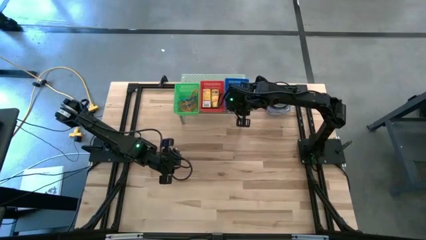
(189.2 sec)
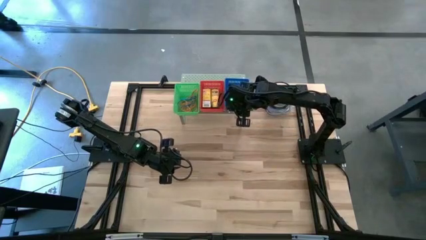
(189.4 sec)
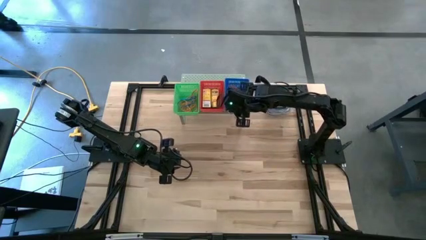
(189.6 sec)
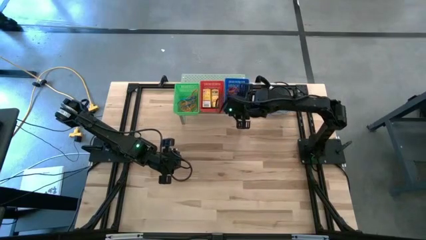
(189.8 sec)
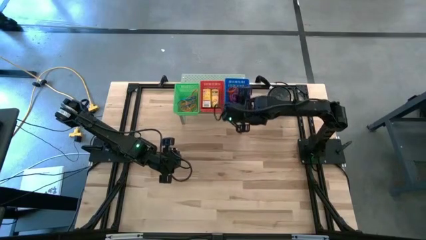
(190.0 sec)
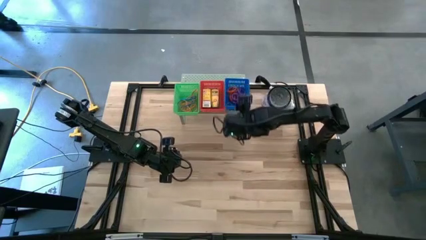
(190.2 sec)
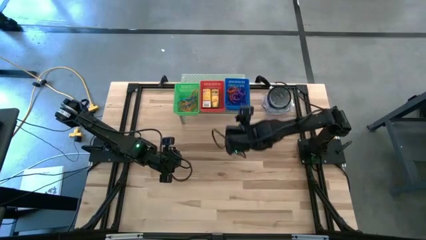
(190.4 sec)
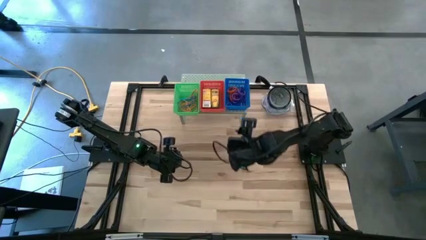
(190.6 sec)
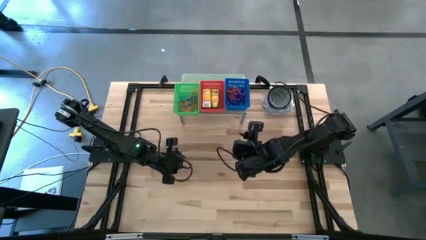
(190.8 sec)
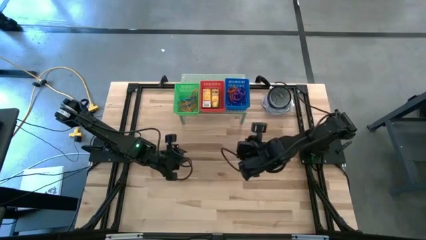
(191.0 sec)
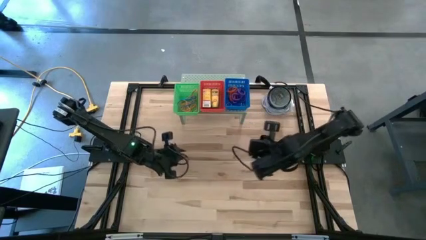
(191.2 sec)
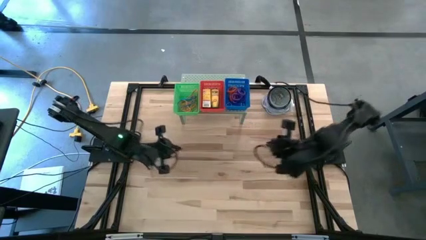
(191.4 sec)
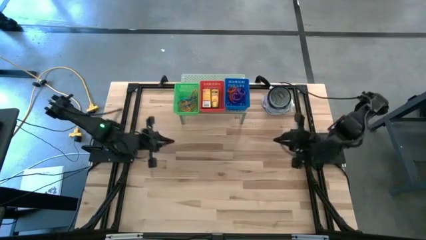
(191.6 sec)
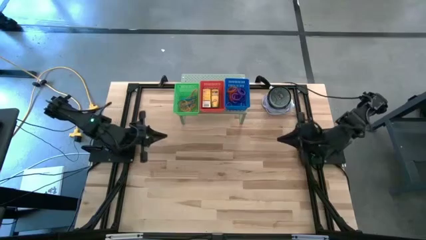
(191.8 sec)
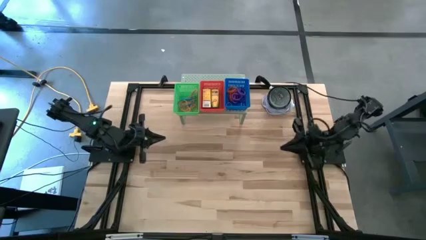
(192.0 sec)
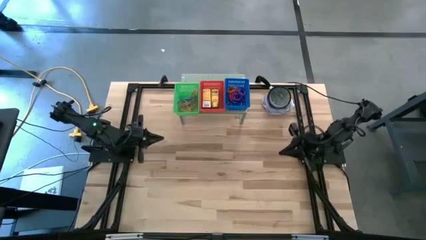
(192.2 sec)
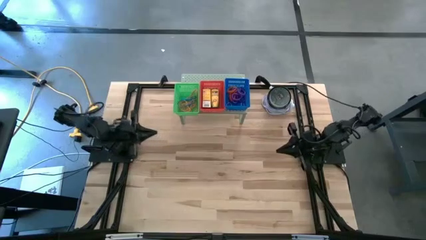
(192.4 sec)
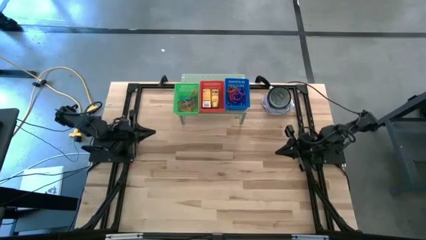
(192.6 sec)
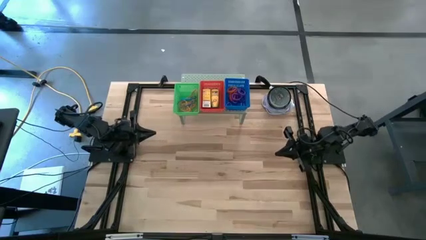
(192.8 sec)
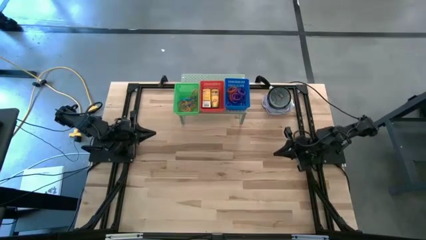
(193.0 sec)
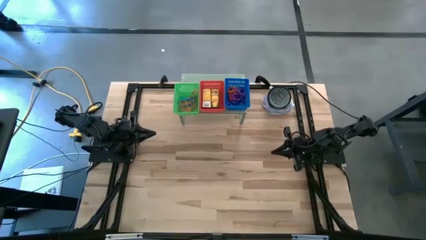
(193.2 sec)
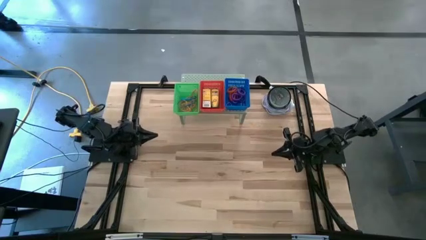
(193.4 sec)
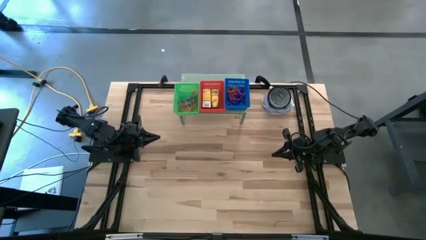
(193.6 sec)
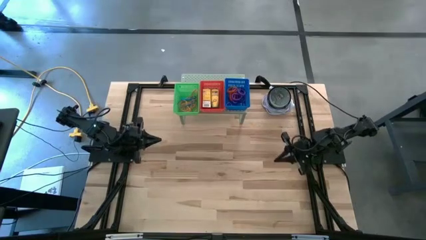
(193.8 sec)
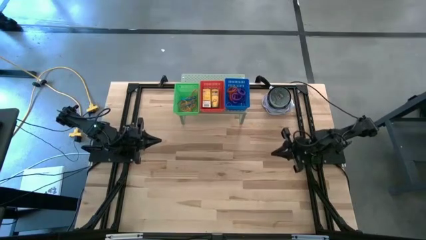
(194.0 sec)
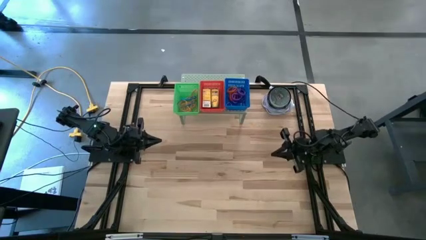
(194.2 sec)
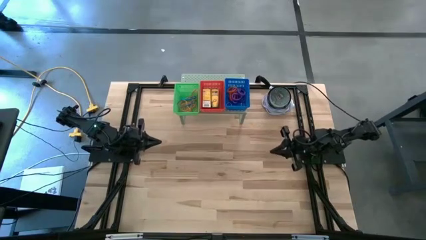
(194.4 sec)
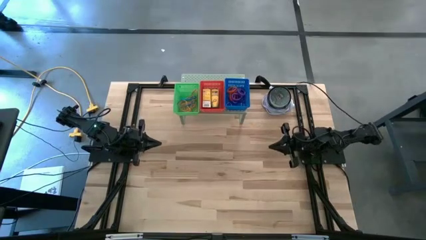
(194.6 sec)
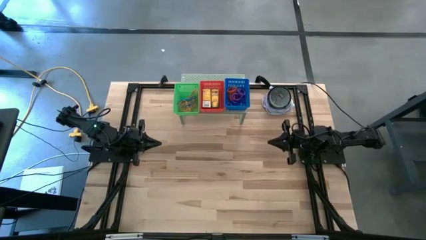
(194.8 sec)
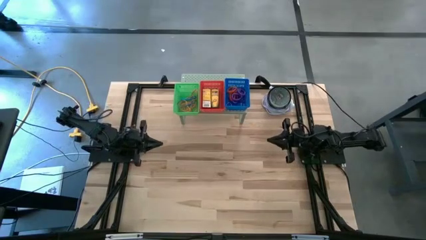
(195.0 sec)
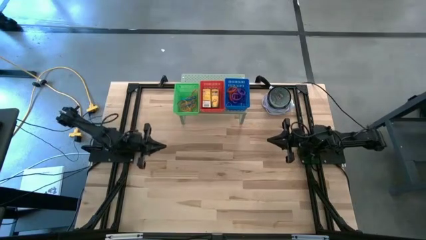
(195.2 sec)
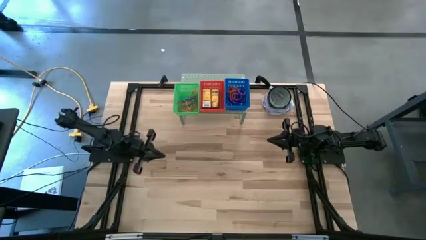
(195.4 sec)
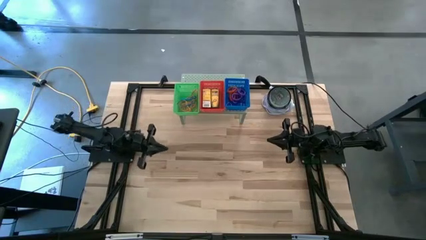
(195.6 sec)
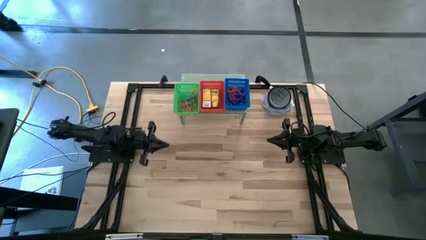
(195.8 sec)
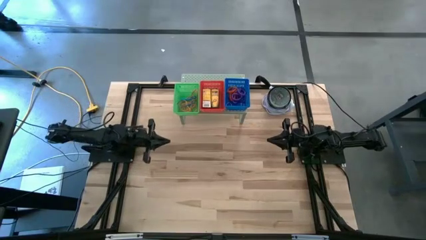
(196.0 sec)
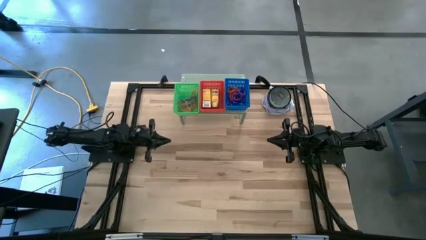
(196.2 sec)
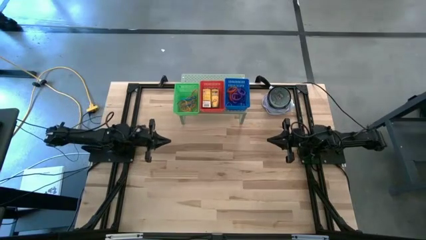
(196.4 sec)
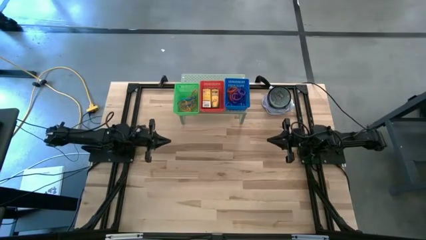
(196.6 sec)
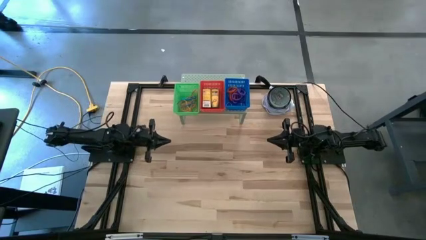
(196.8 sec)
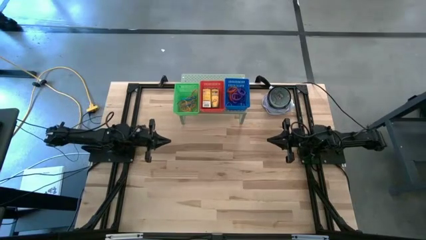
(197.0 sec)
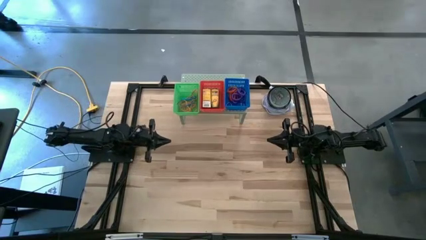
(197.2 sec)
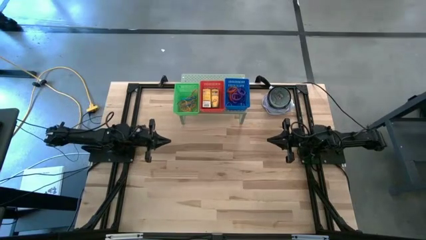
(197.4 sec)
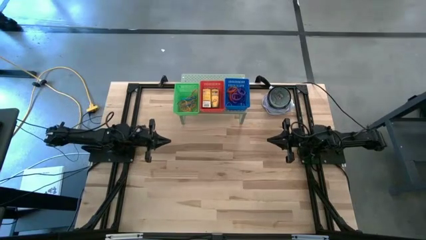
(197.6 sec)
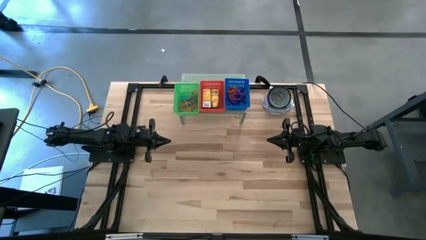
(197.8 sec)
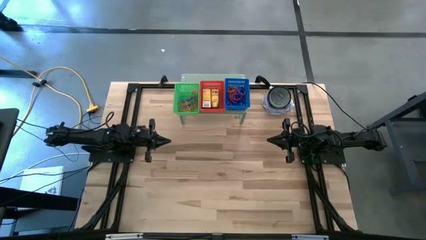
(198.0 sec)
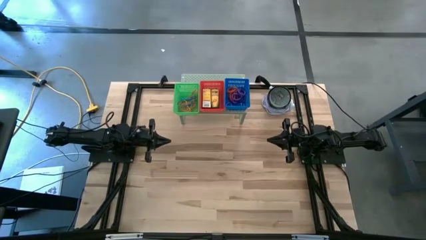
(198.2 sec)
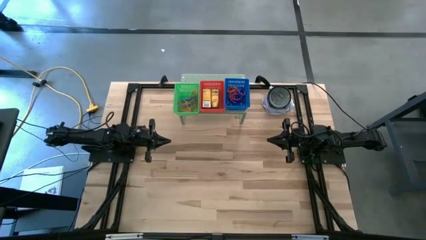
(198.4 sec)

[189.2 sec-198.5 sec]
Task: Pick & Place Office Desk Supplies
Return to Home Position

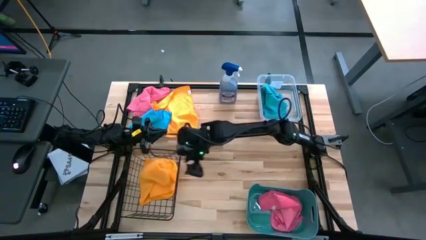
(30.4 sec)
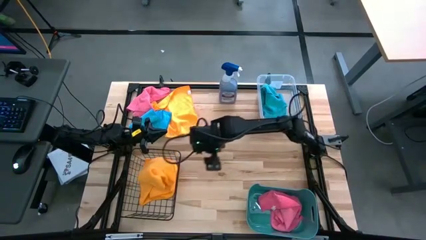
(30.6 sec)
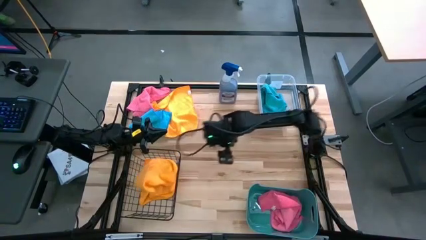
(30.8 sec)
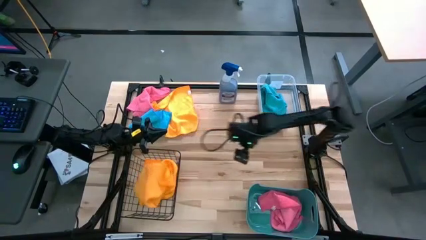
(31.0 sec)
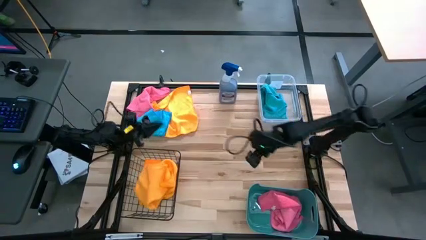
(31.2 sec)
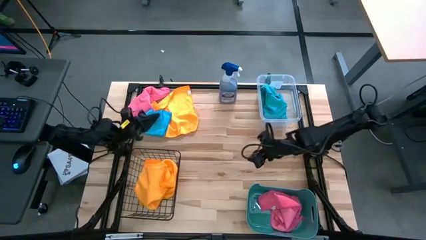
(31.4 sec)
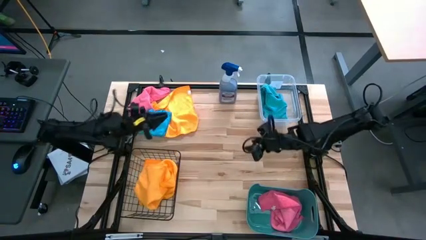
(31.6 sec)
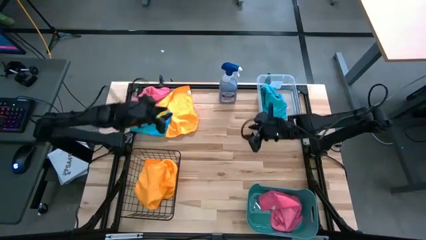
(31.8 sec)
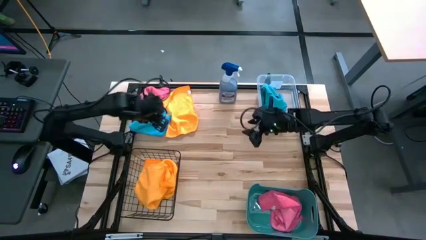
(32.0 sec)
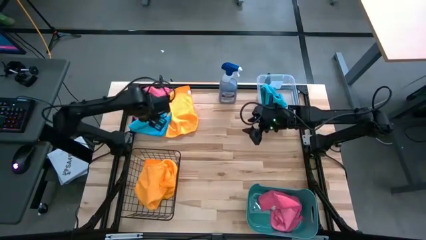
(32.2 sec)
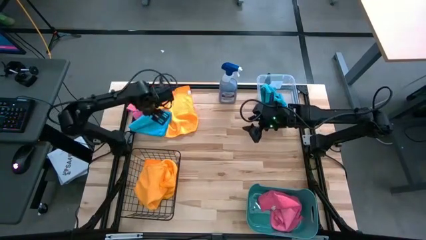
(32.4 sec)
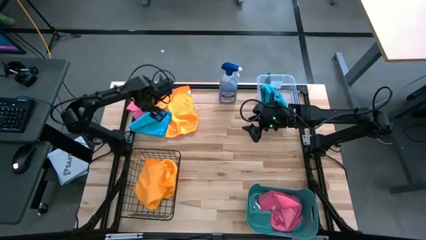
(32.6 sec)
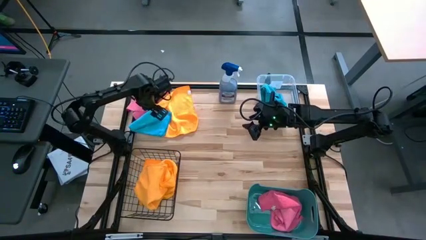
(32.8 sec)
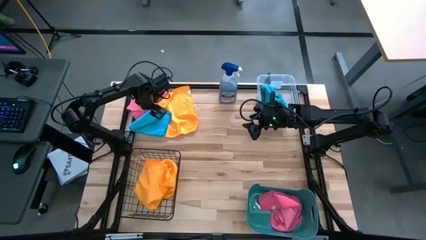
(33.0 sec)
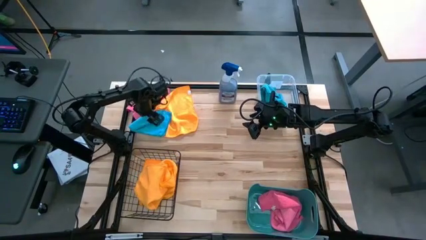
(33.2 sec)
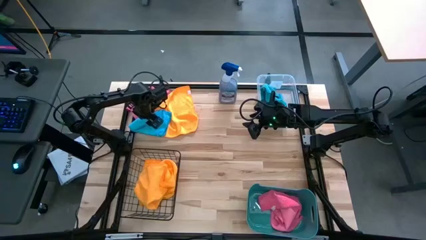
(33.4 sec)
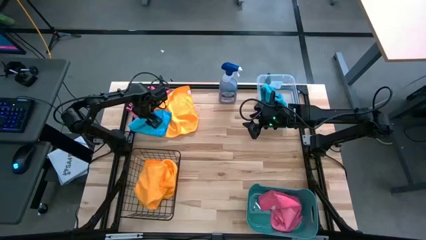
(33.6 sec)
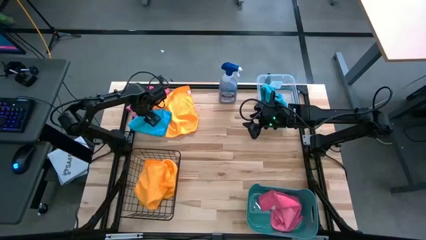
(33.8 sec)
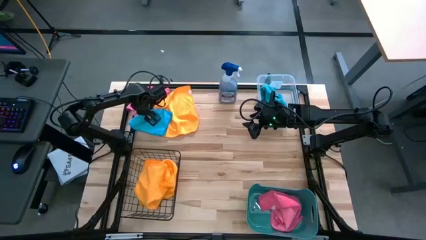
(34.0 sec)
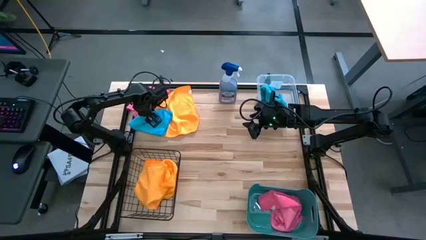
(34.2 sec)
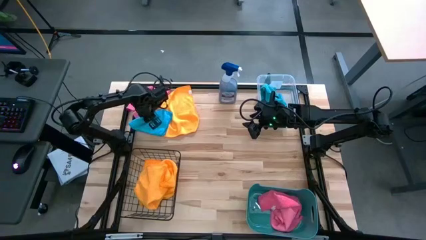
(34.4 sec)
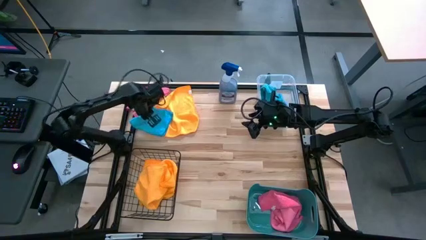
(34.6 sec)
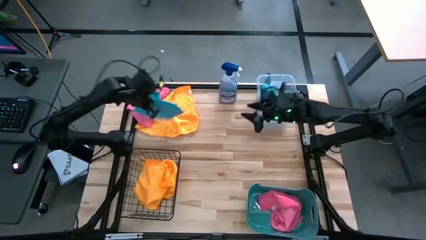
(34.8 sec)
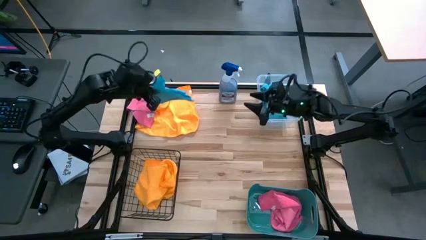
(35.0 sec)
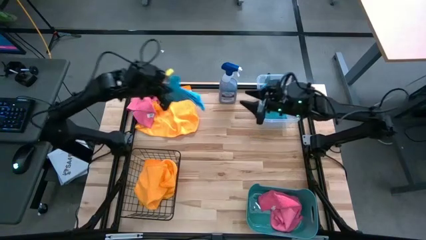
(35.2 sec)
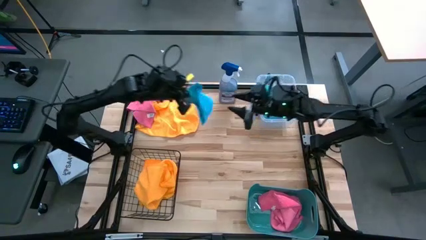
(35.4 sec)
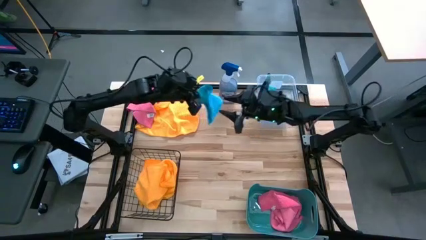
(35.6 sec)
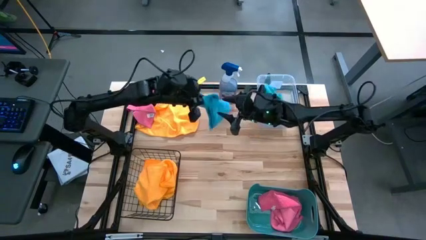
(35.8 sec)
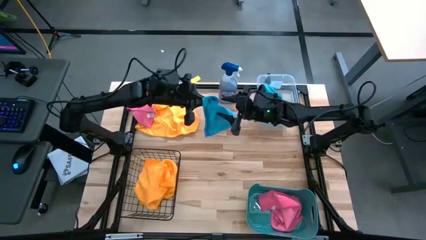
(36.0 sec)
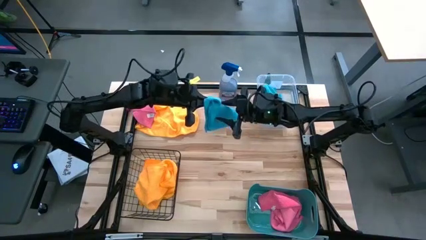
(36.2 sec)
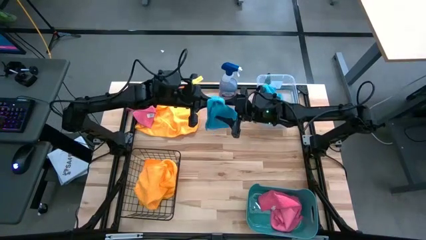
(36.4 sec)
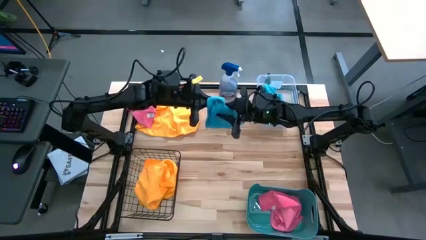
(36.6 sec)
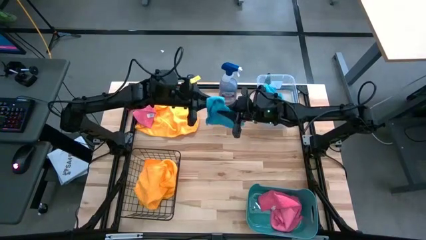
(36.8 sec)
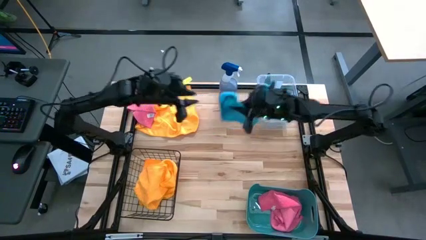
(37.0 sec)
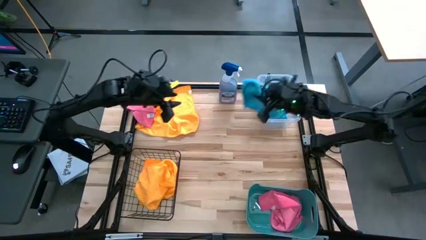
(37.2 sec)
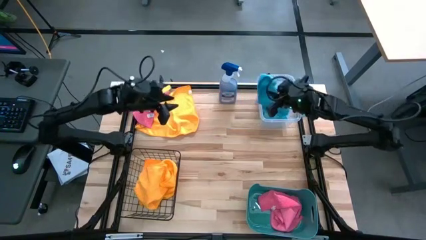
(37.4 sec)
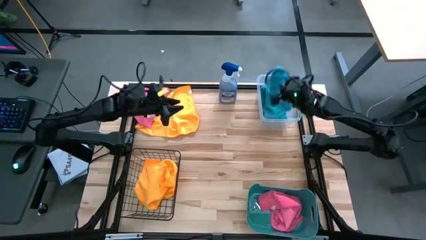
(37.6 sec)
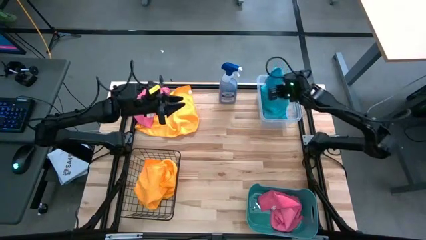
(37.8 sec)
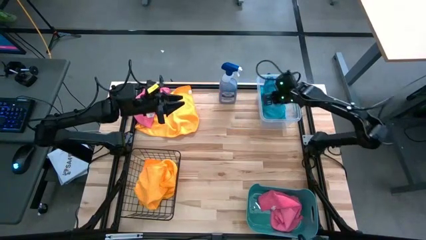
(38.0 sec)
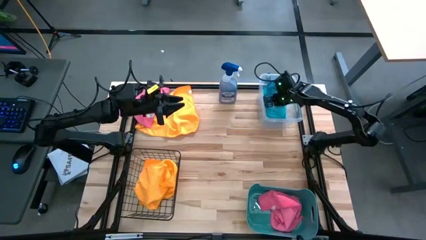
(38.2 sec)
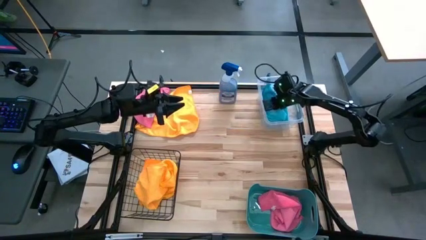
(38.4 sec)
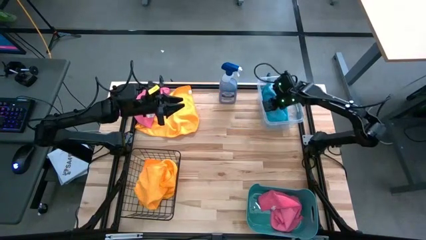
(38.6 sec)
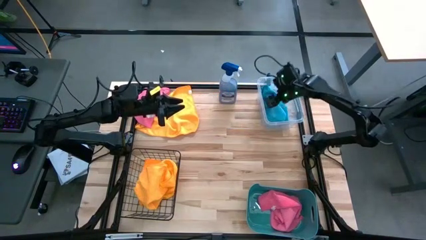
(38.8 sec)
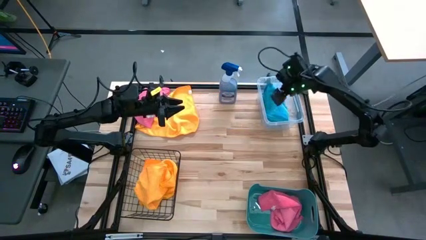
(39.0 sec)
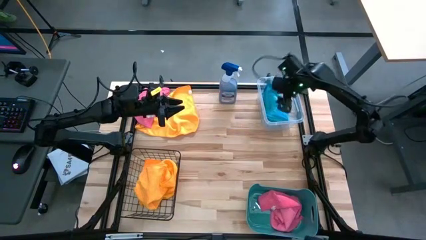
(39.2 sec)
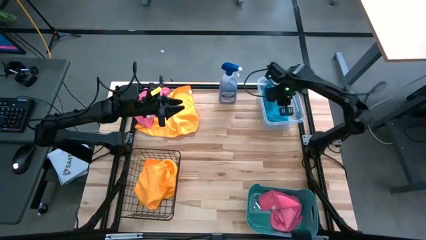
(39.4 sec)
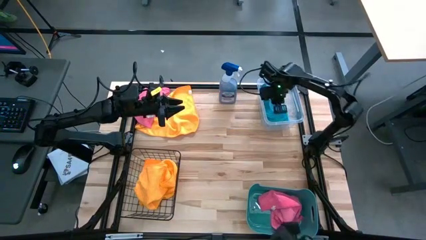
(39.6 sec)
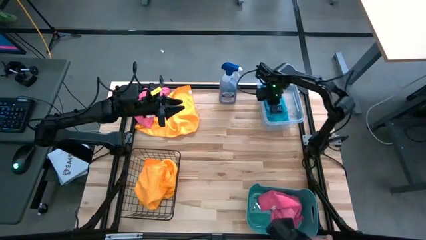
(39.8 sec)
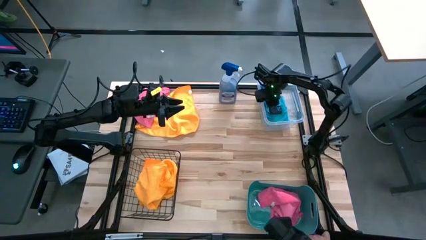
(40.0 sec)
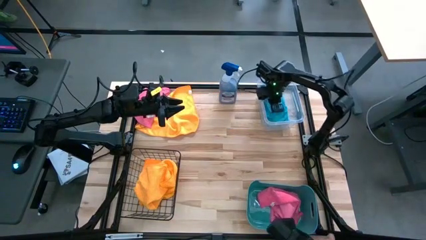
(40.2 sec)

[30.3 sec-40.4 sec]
Task: Sort microfiber towel by color & place in baskets
Put the blue microfiber towel into the transparent bin
